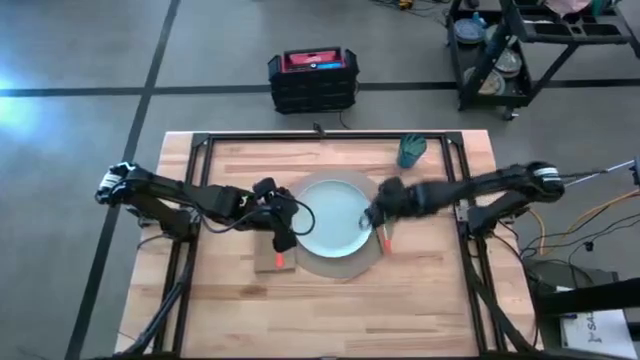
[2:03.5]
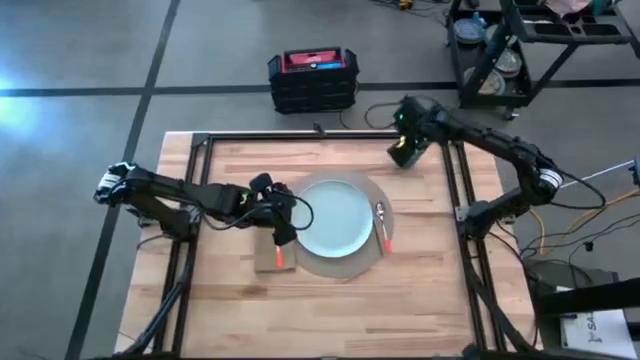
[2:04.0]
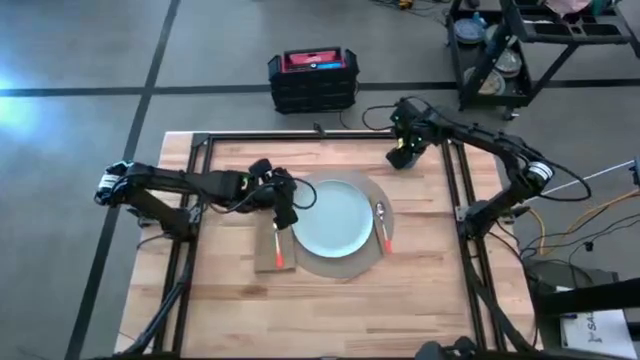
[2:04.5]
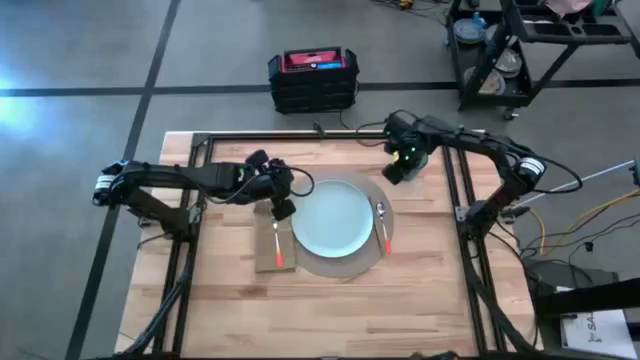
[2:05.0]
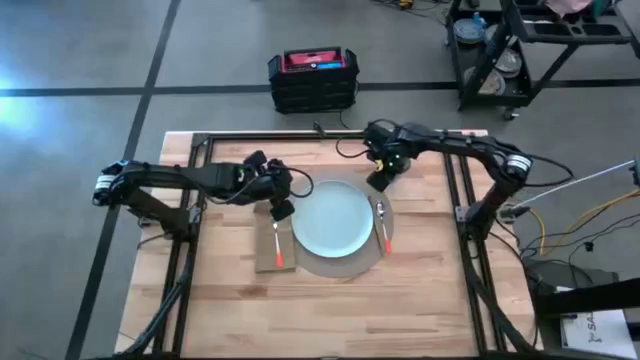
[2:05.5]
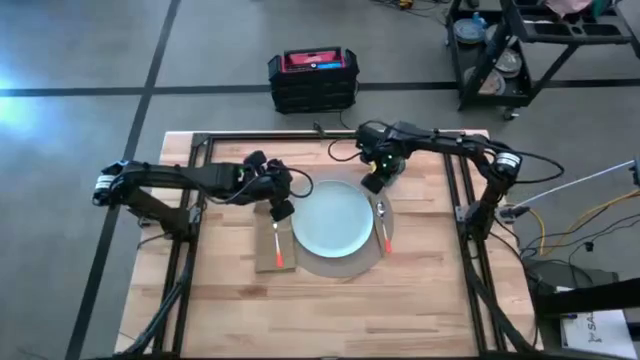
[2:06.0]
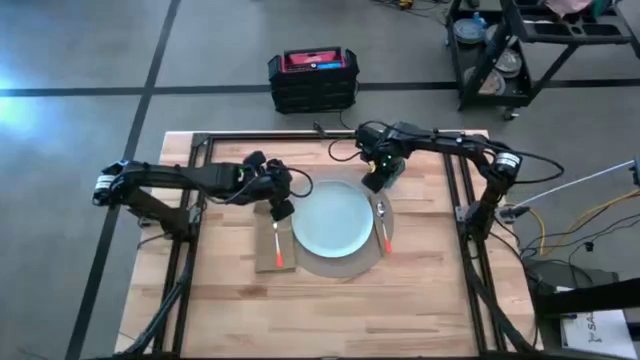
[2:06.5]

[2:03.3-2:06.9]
Task: Set table place
Move the blue cup on the top right of the table mat

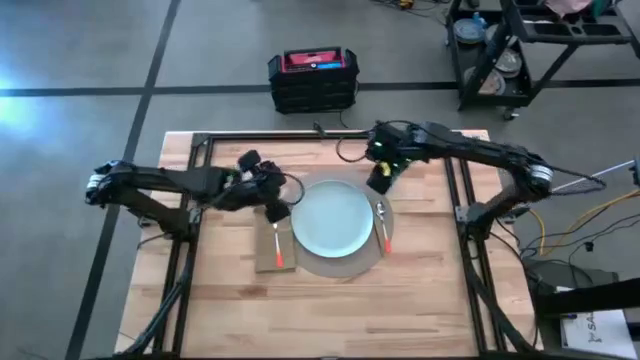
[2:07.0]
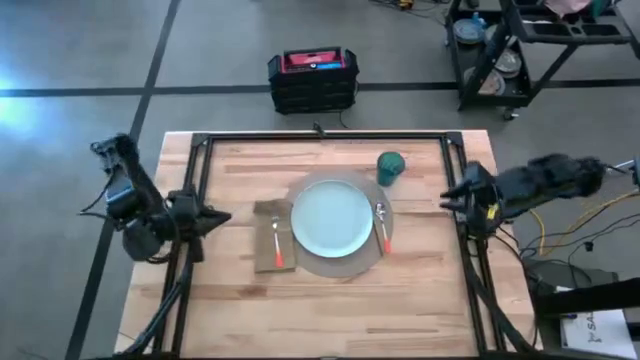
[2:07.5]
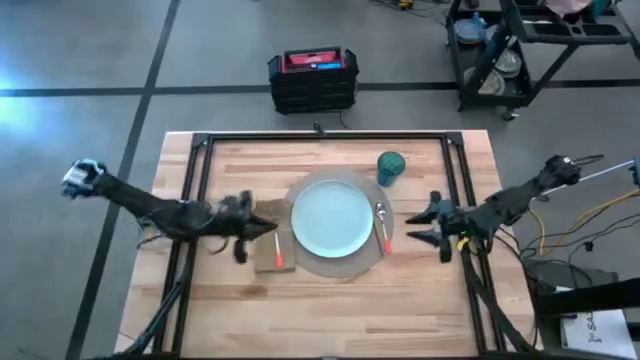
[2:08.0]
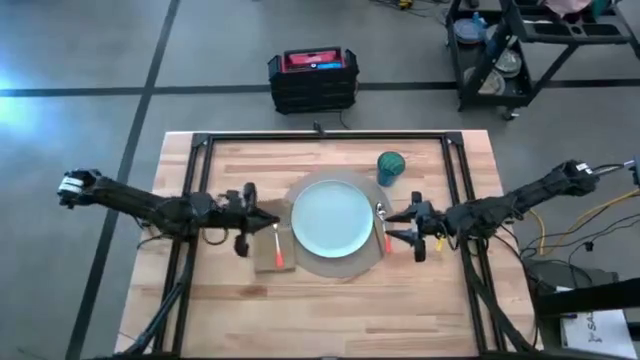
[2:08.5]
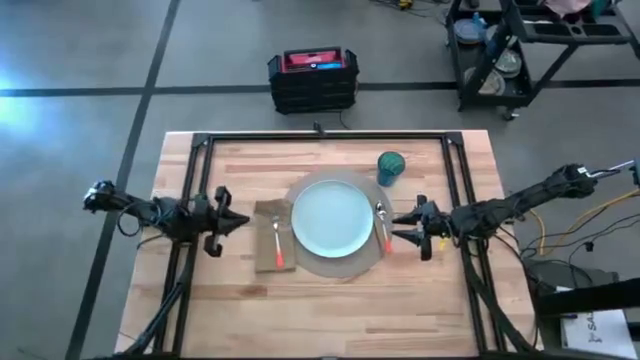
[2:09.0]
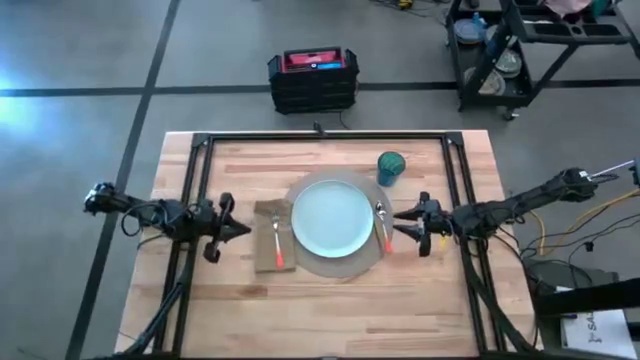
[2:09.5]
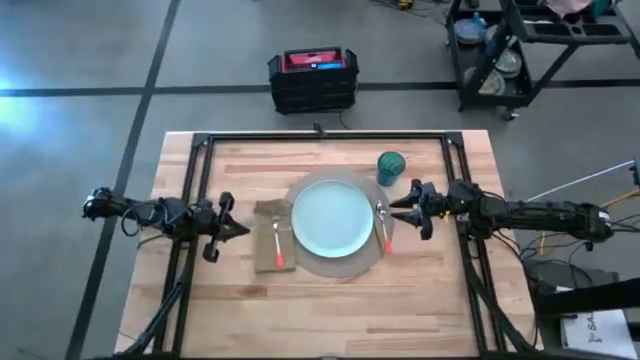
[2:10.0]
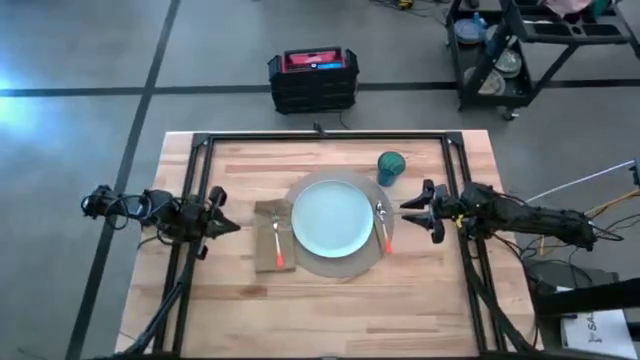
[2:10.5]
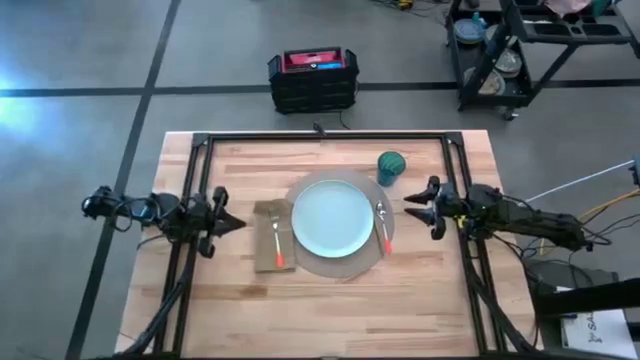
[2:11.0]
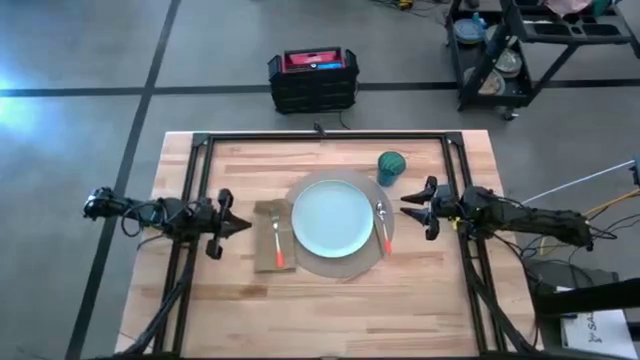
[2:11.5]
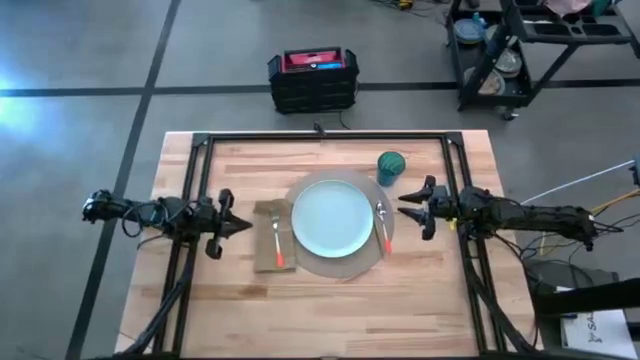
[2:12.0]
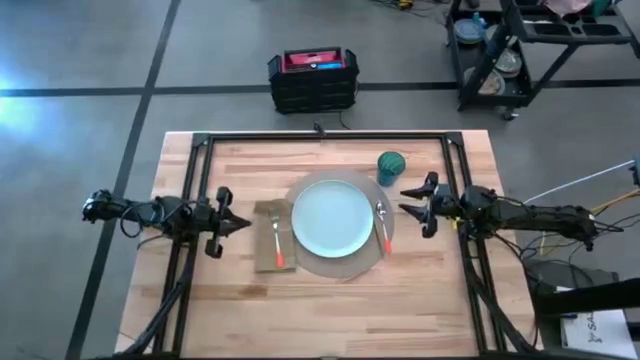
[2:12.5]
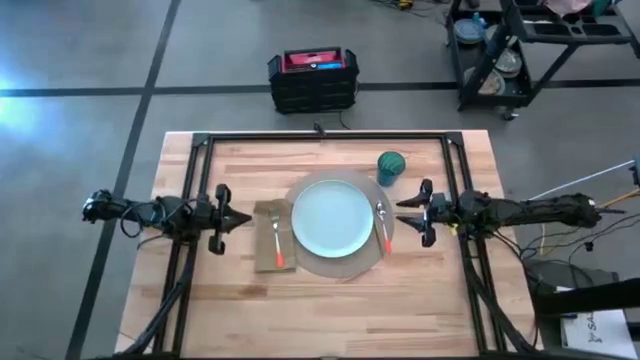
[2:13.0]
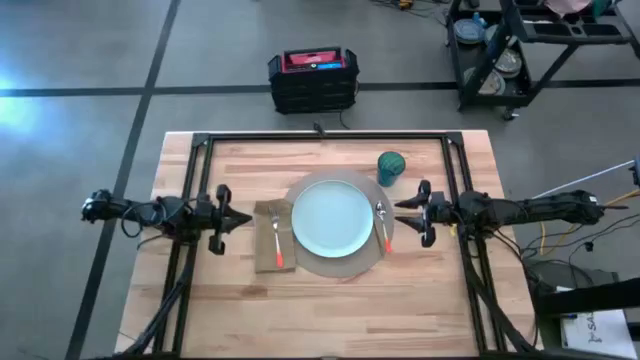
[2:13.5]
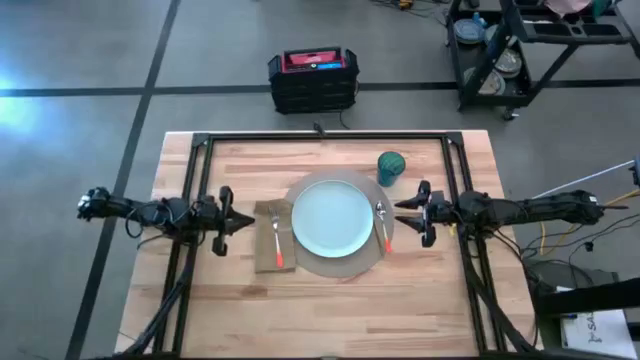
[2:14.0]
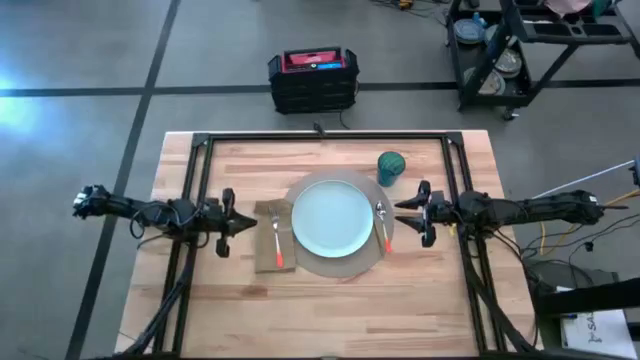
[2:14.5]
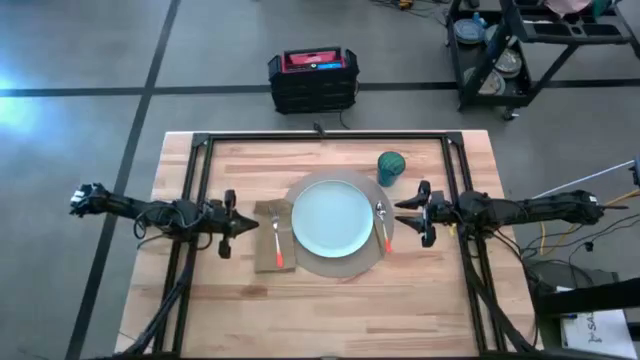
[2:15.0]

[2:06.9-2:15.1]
Return to Home Position

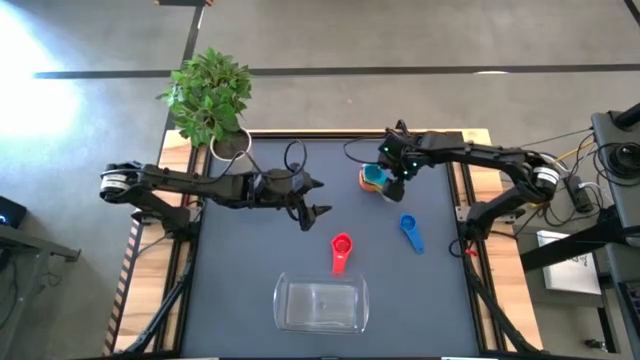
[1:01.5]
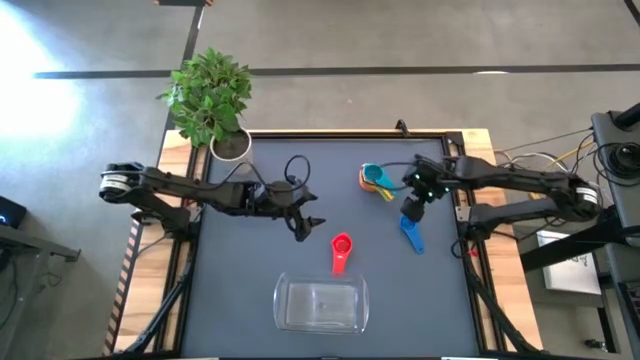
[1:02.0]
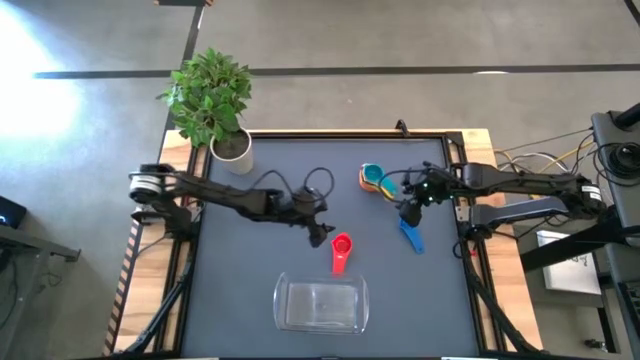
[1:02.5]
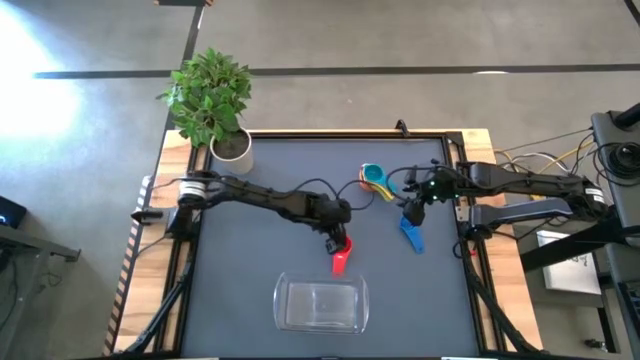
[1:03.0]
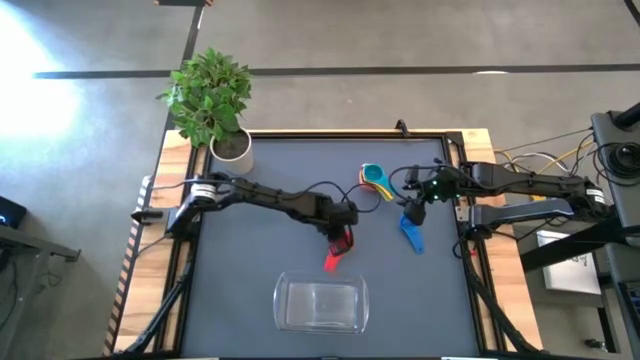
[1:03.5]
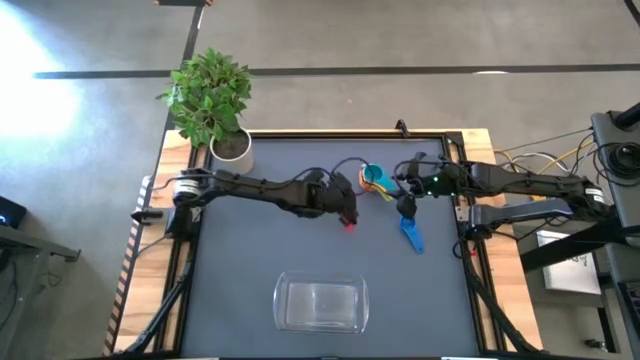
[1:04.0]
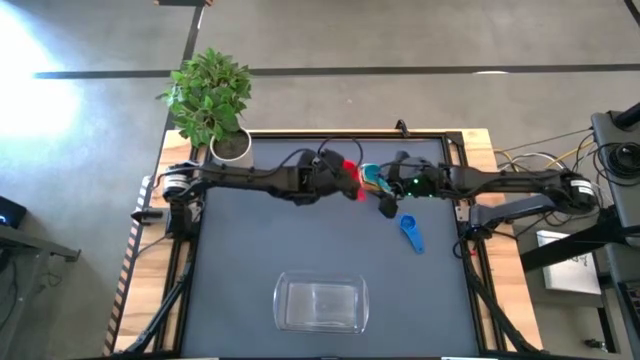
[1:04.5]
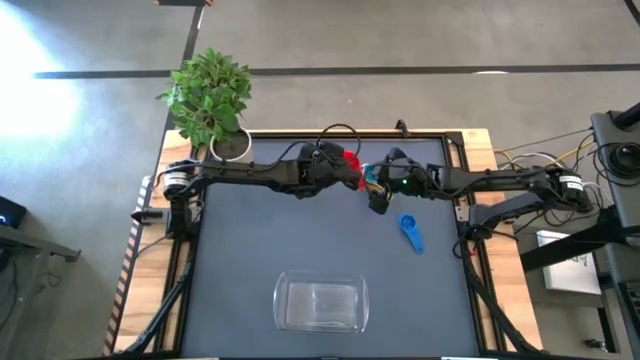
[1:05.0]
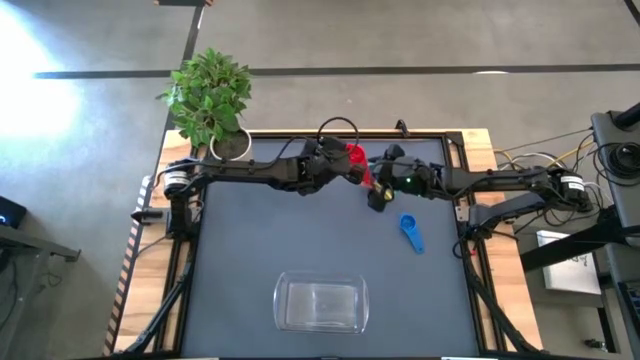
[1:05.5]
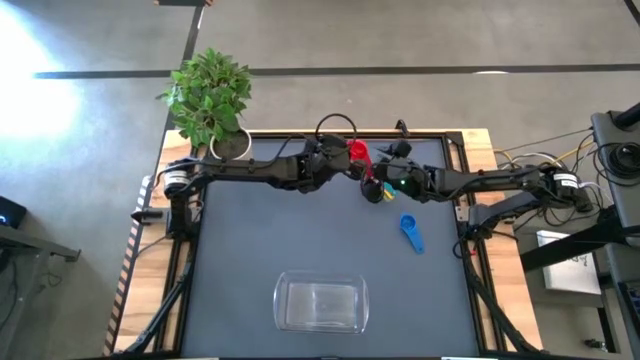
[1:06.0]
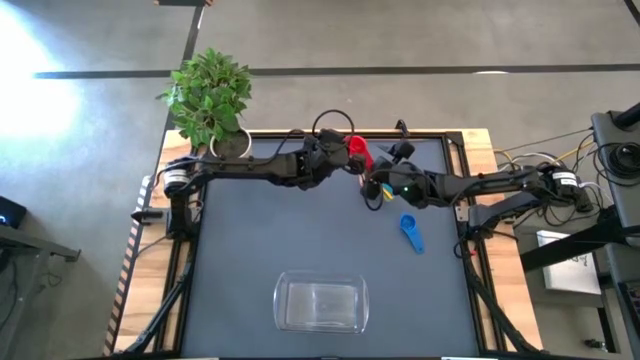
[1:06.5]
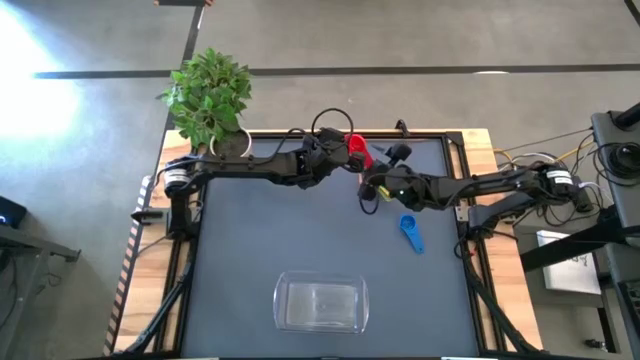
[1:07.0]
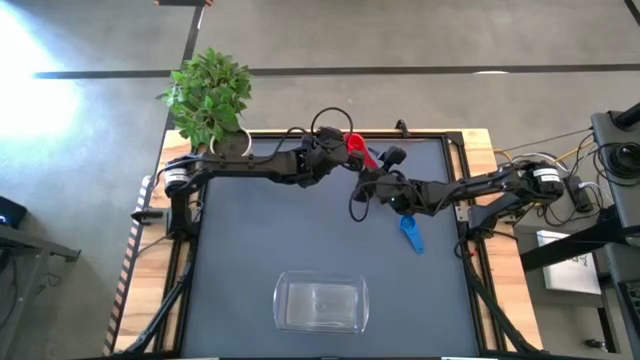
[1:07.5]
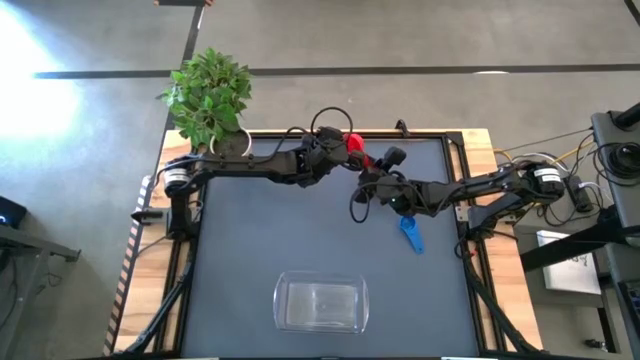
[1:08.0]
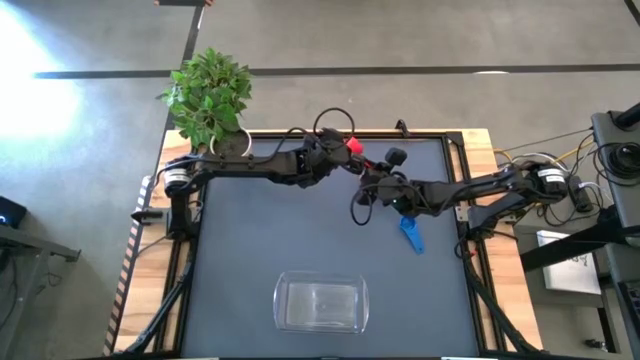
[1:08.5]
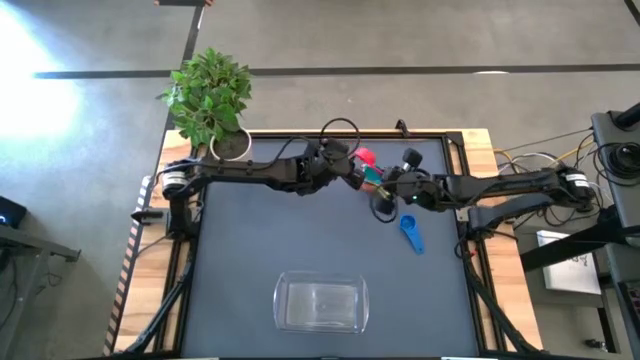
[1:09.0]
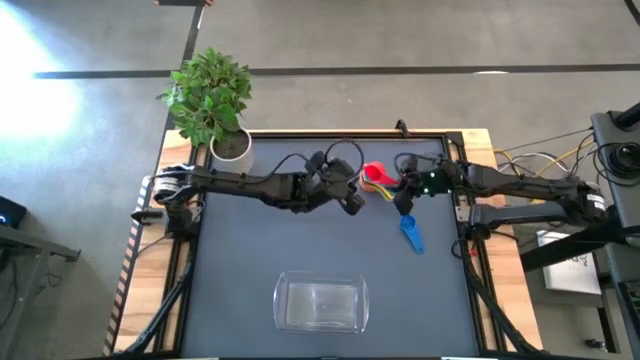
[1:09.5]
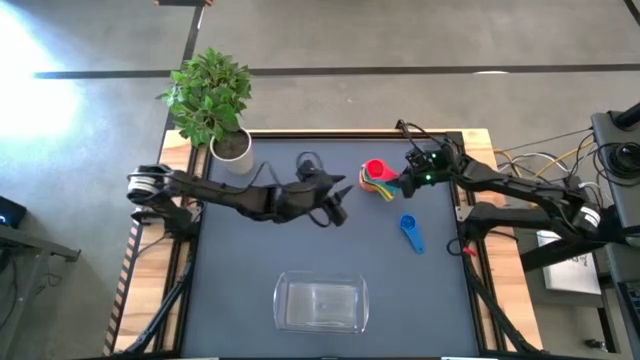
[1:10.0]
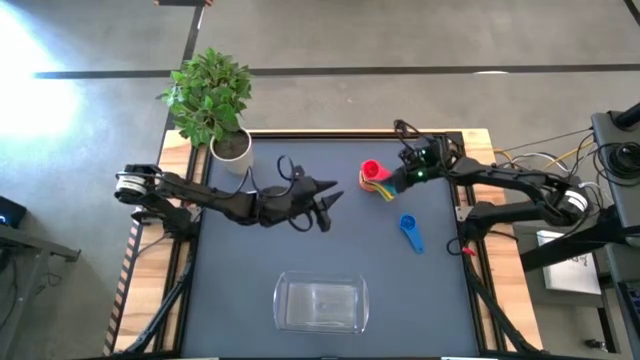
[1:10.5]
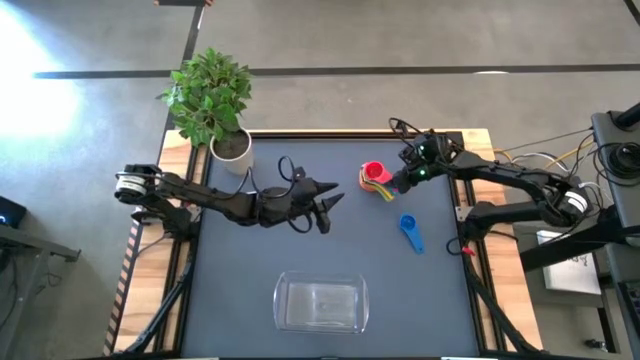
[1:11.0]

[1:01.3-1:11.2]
Task: Nest measuring cups in basket
Stack the red measuring cup on top of the light blue measuring cup
